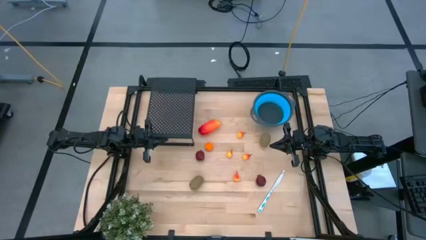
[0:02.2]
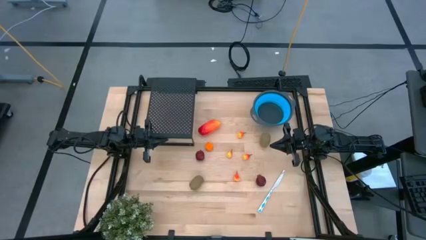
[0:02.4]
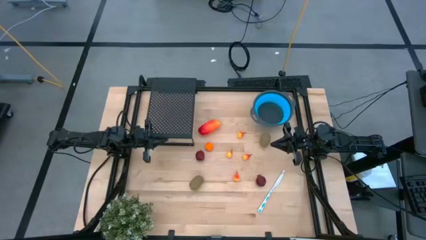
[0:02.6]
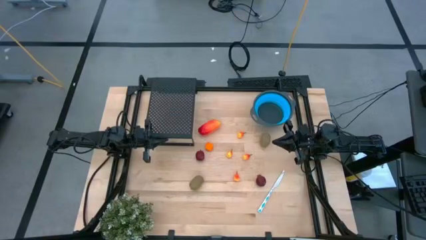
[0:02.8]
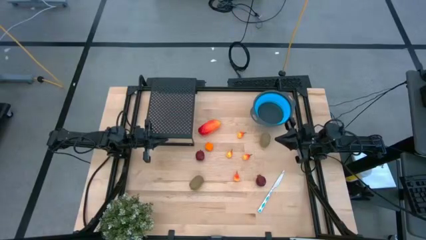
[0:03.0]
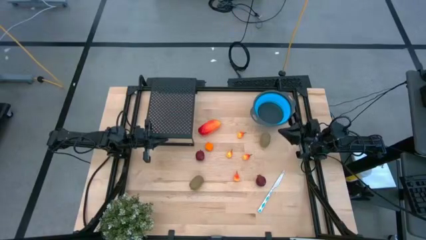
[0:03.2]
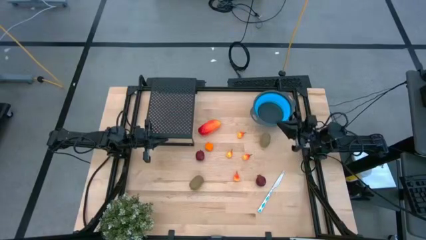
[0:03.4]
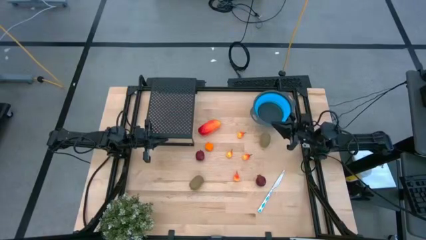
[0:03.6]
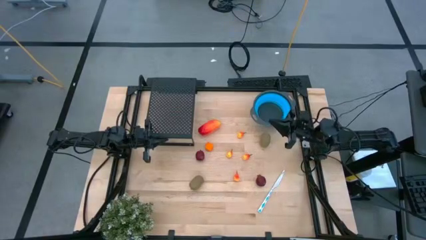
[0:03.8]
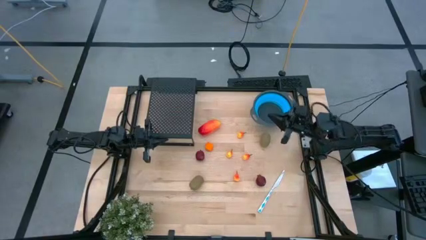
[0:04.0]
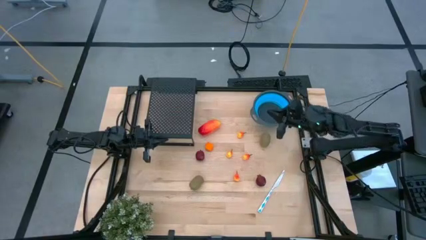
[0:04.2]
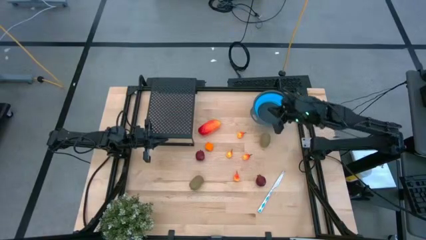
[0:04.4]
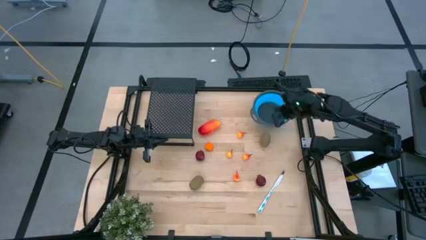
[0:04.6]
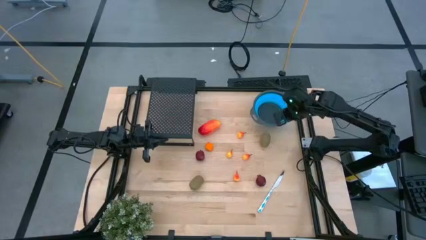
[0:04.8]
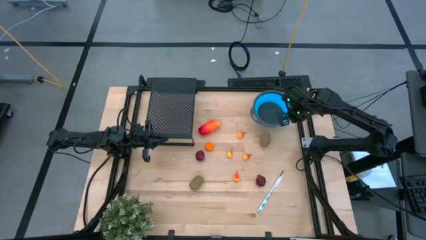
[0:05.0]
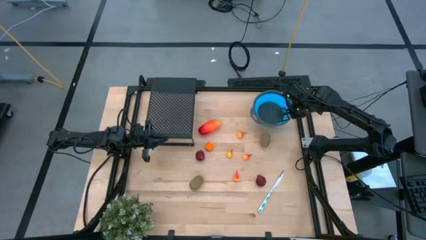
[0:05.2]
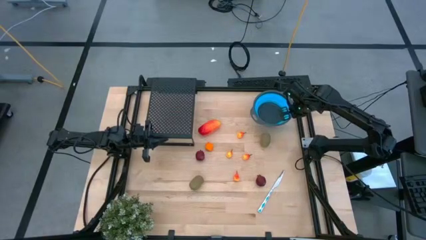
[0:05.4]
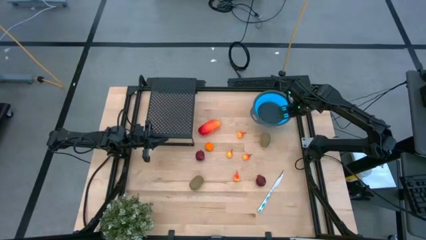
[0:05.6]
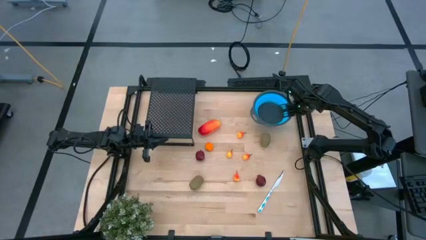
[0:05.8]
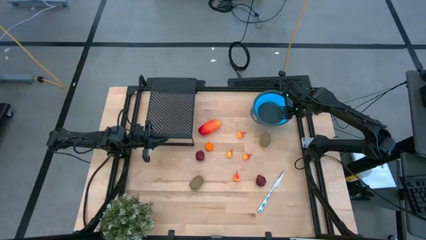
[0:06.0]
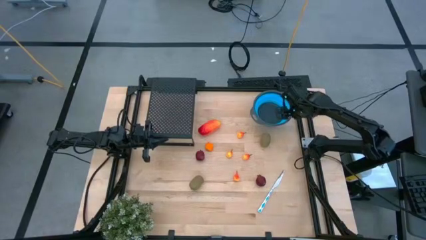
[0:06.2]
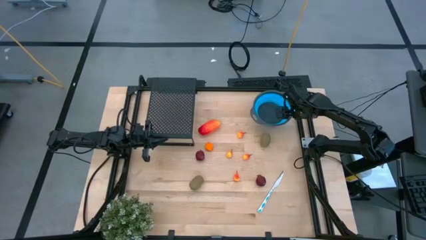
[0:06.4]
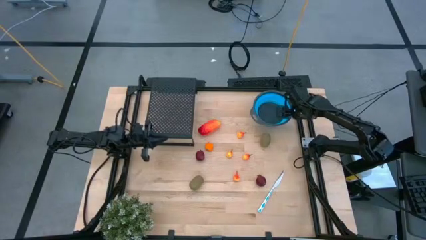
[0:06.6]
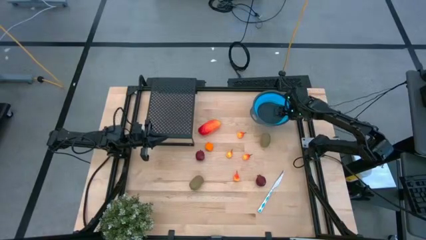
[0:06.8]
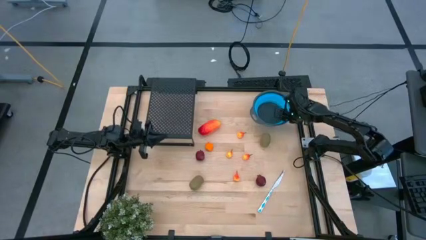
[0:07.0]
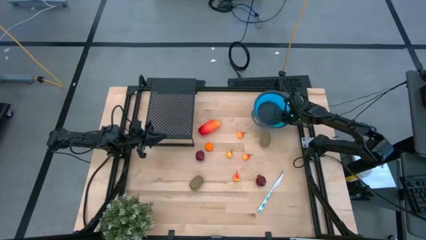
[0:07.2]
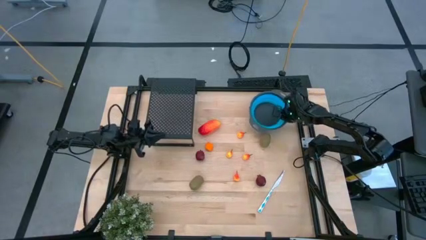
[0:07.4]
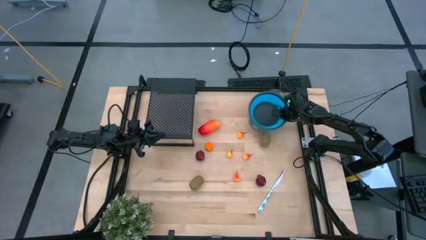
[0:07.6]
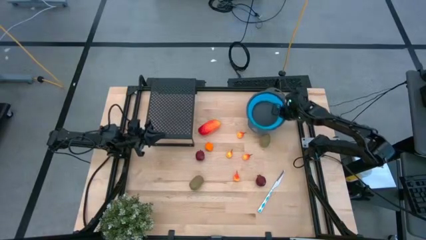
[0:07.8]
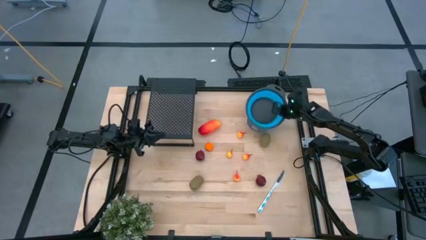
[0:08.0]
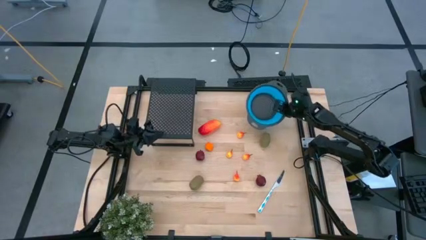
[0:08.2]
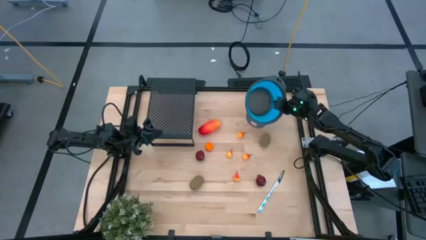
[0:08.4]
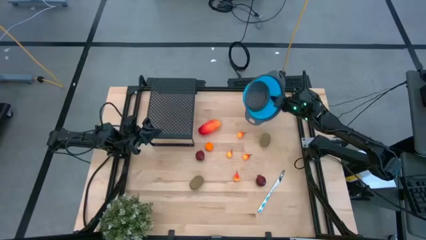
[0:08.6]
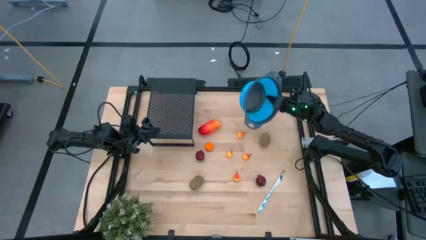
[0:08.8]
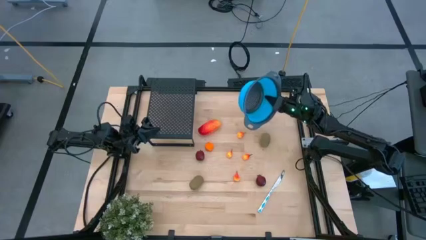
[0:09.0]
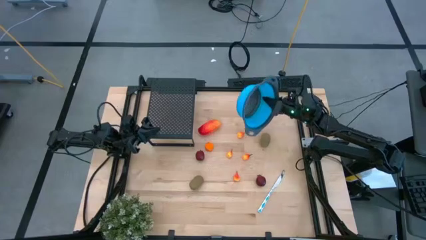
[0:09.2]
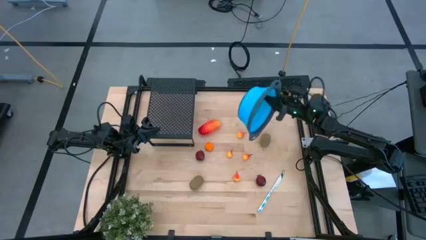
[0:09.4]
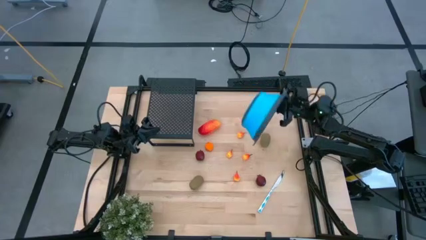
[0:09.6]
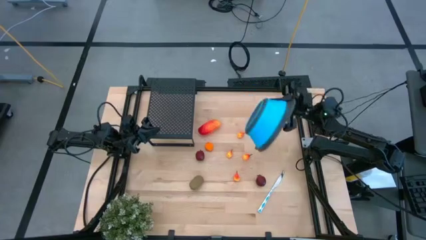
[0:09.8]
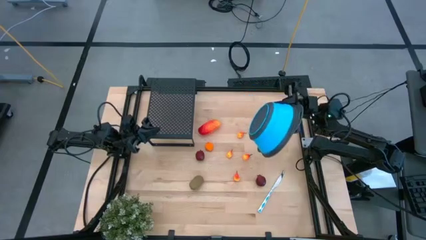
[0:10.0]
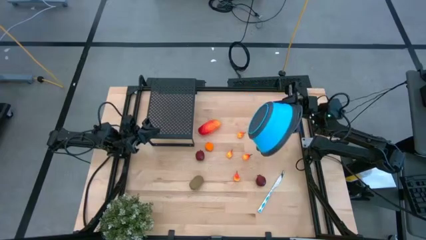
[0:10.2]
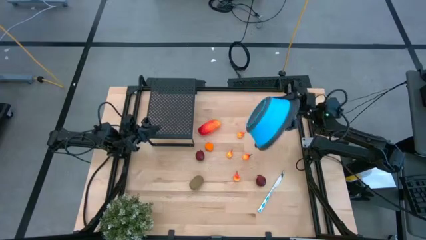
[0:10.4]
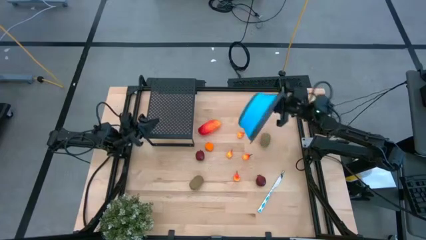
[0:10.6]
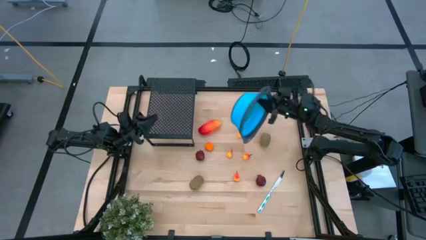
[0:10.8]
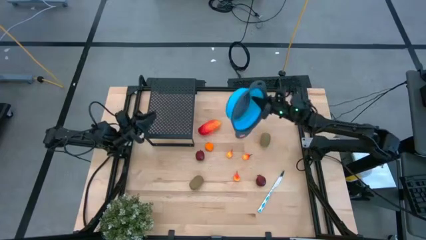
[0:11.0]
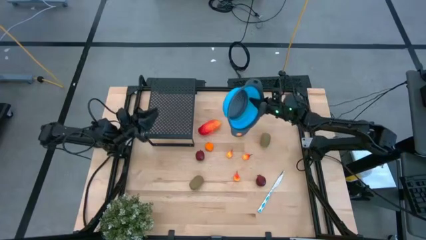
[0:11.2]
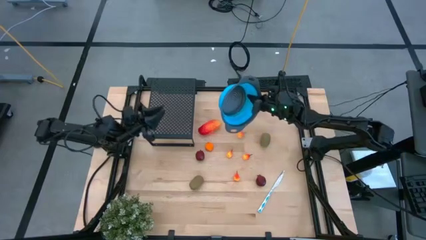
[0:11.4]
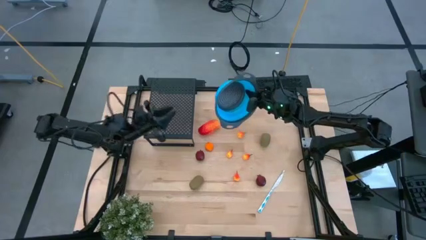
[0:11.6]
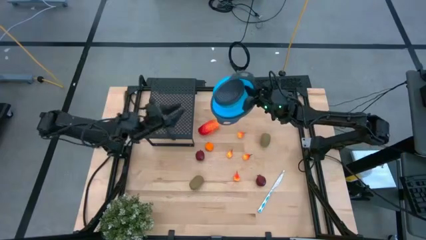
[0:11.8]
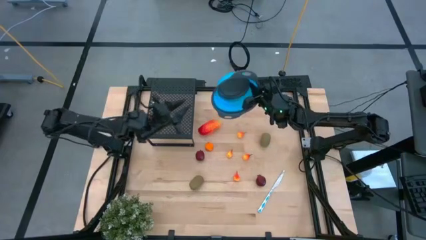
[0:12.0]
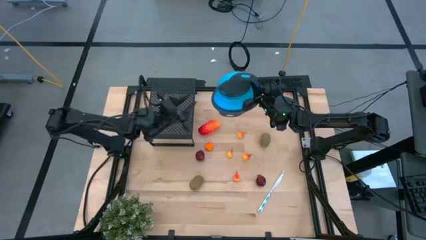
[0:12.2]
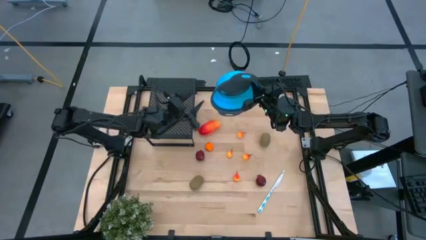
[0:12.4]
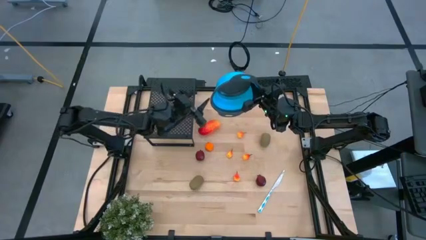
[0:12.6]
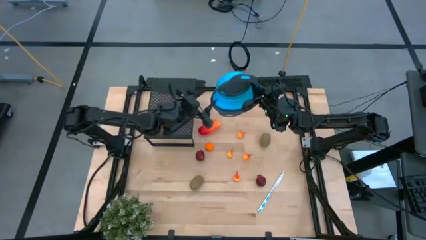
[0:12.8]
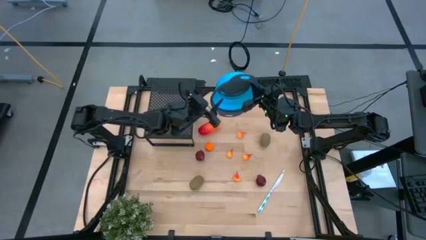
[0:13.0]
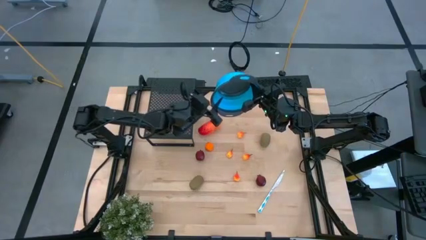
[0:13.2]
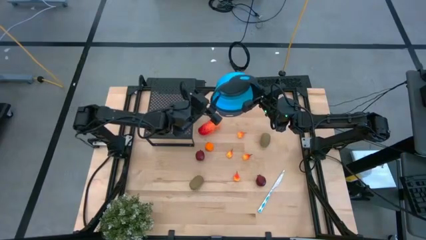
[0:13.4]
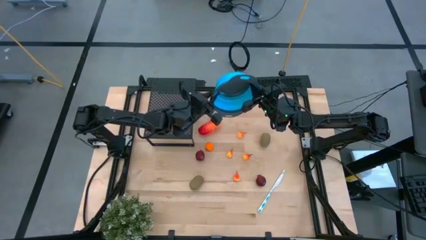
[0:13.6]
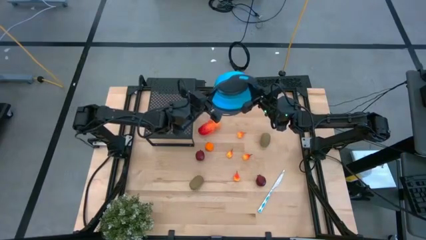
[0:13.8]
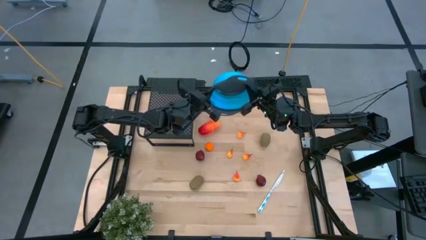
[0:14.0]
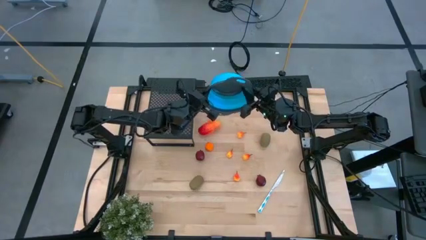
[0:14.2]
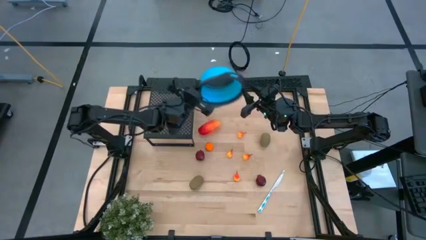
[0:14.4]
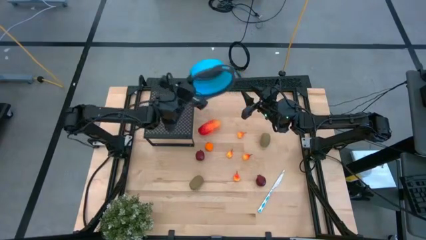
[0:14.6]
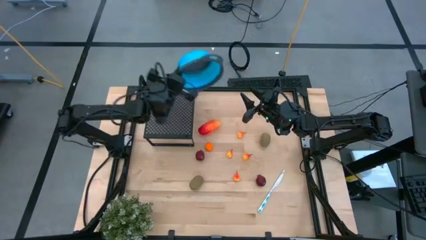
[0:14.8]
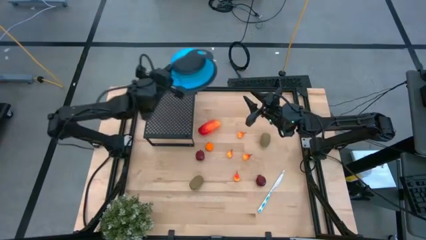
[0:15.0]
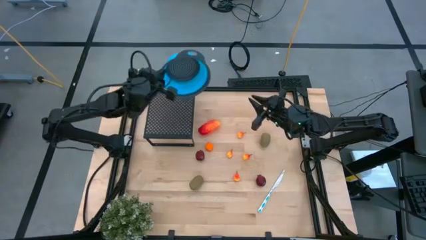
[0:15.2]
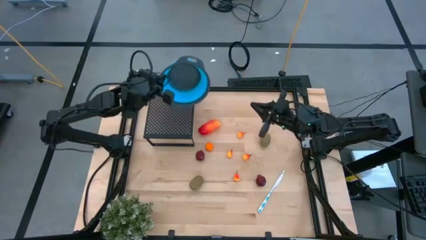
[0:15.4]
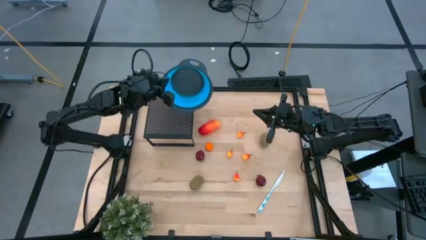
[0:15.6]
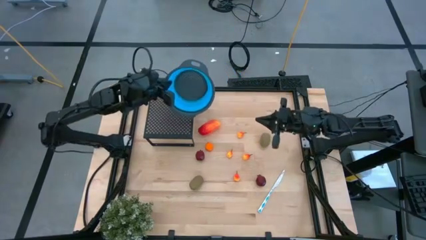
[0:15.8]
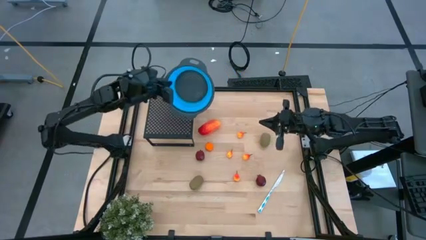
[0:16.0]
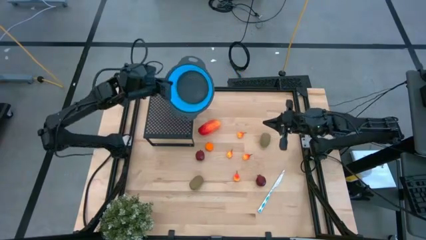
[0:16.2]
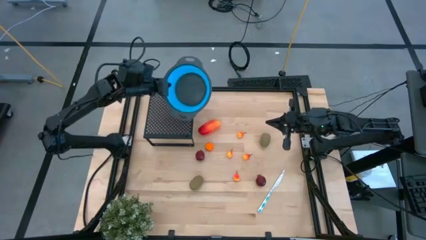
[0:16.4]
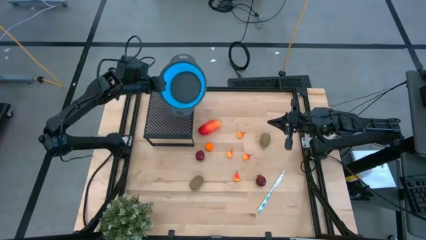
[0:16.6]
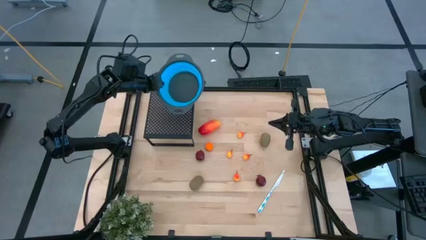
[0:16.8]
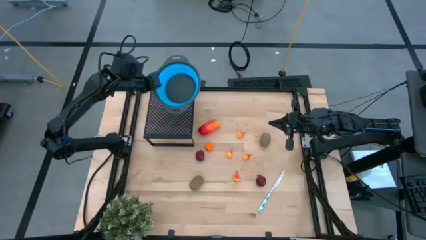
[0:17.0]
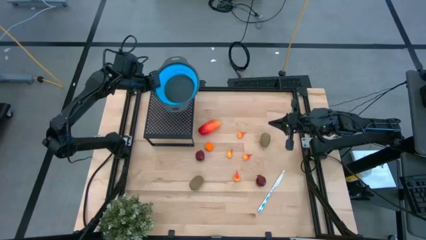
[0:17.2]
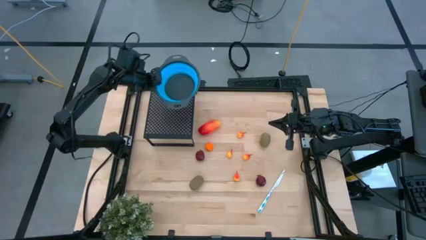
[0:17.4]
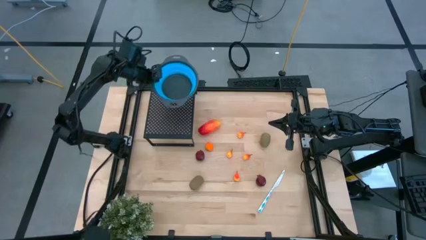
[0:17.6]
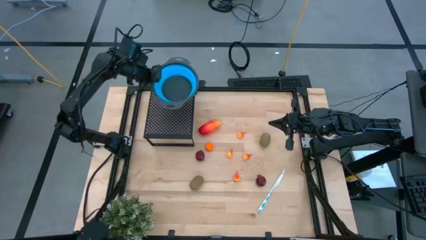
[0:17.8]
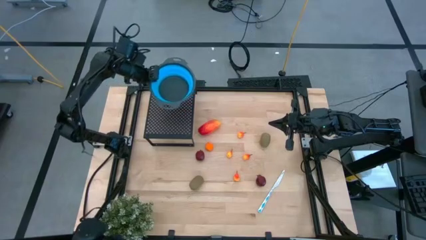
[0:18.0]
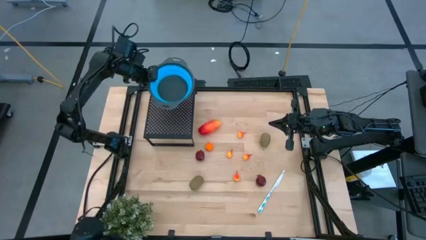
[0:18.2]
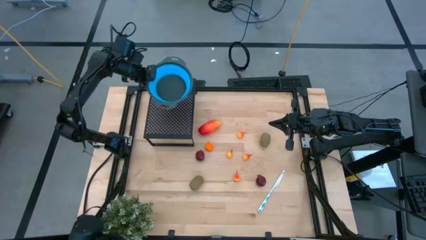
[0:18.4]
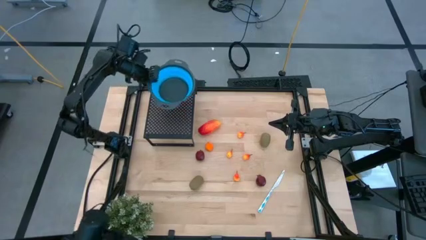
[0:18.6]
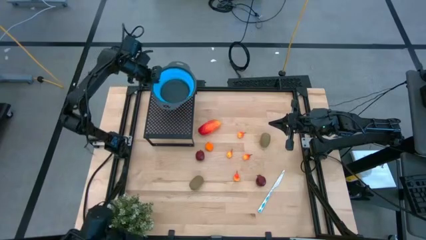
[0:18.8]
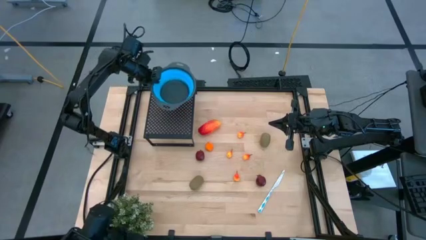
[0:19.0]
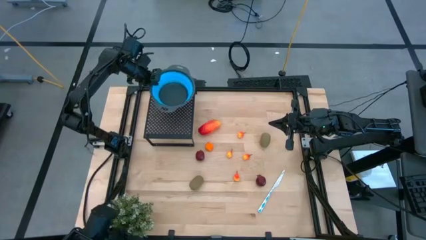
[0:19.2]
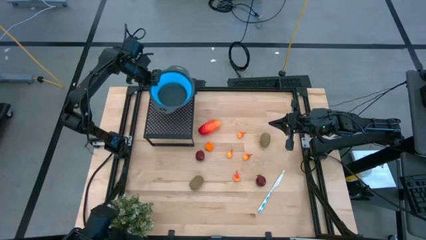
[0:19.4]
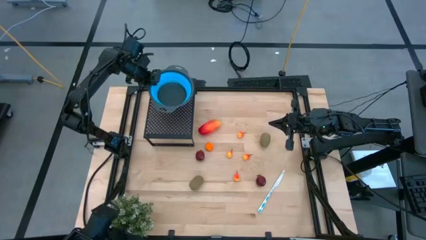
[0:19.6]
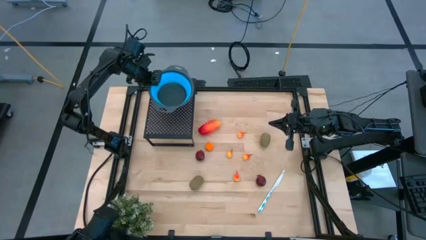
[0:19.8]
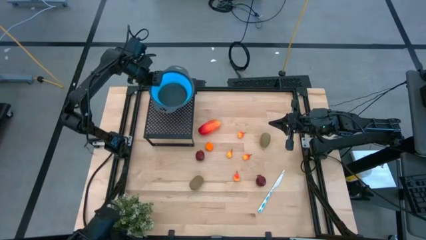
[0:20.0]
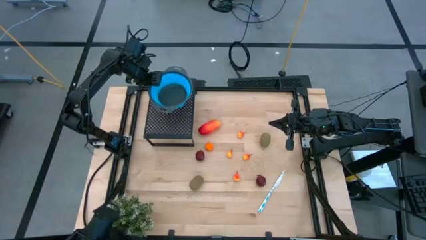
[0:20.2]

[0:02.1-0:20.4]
Task: Pick & Place Fruit
Put the blue strainer bowl on the shelf
